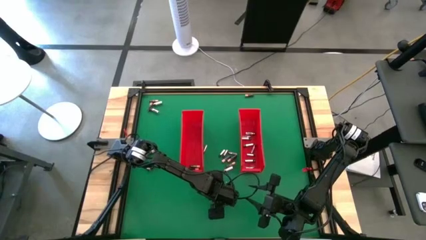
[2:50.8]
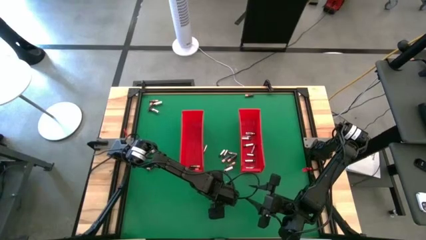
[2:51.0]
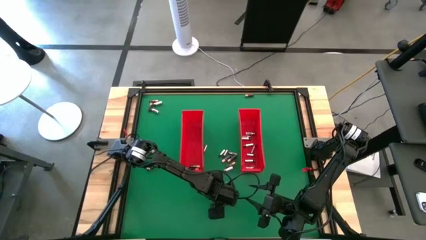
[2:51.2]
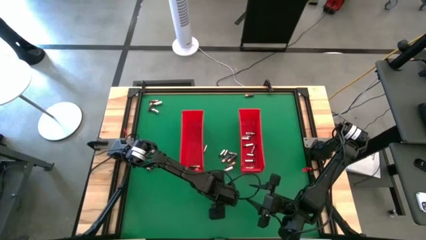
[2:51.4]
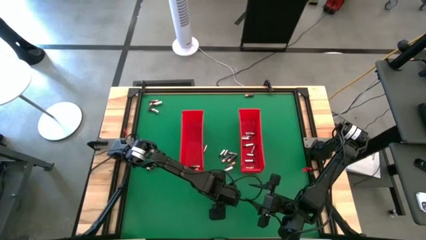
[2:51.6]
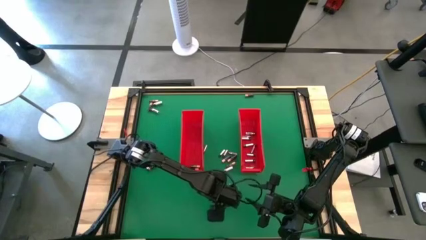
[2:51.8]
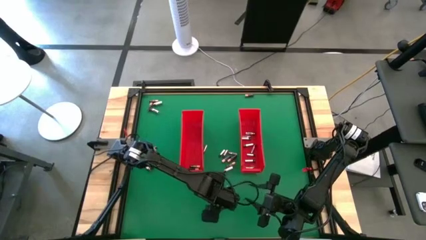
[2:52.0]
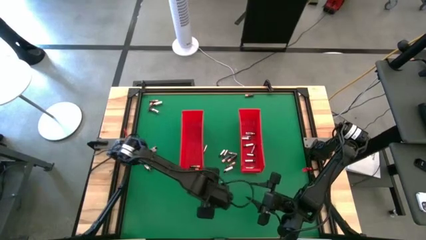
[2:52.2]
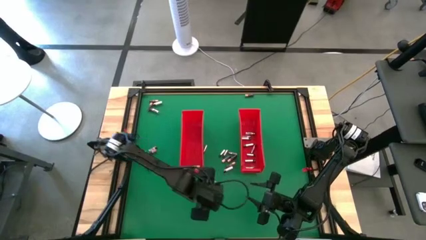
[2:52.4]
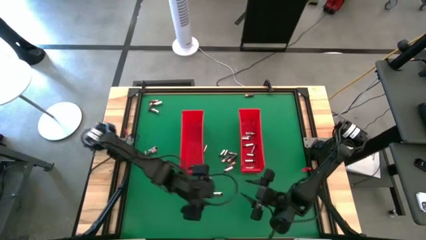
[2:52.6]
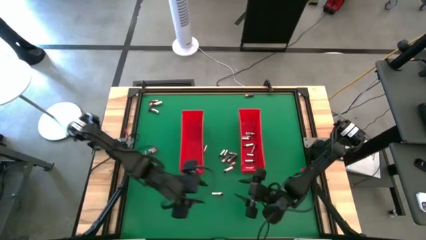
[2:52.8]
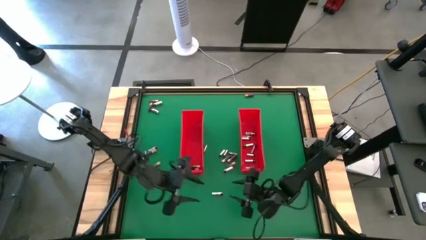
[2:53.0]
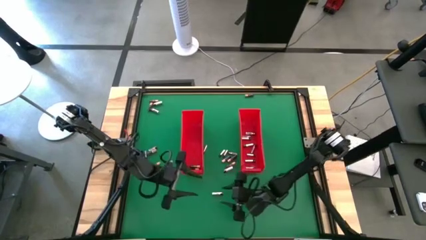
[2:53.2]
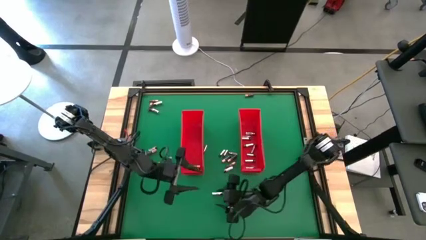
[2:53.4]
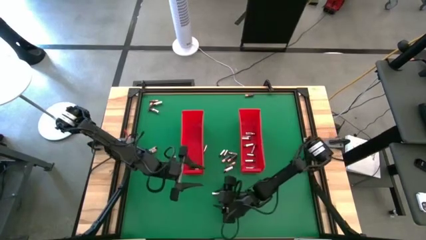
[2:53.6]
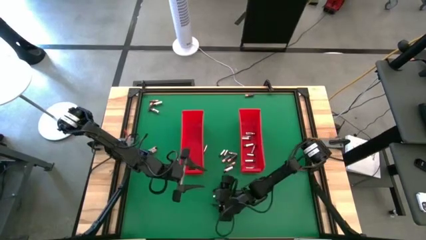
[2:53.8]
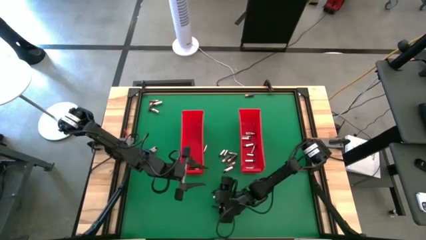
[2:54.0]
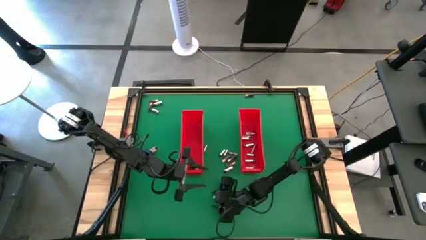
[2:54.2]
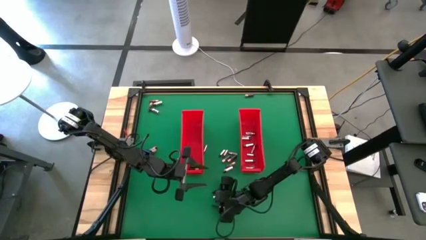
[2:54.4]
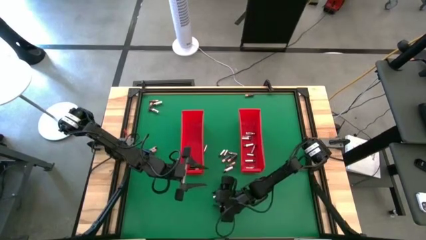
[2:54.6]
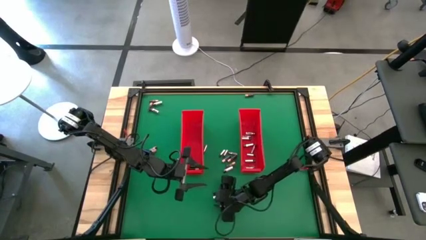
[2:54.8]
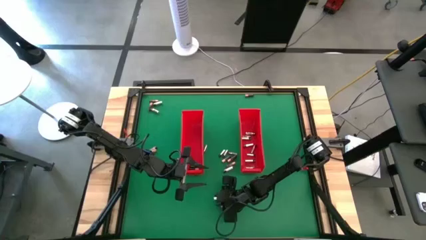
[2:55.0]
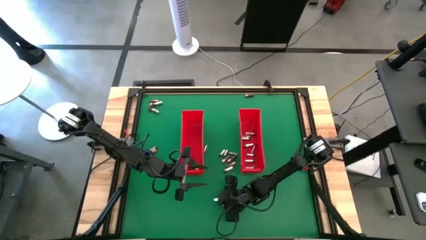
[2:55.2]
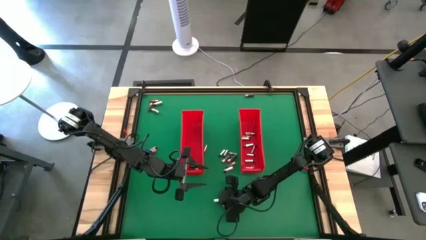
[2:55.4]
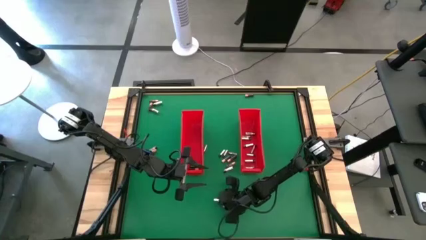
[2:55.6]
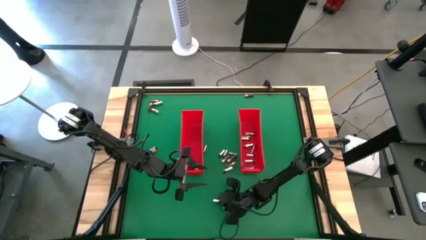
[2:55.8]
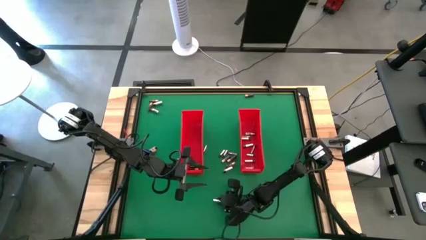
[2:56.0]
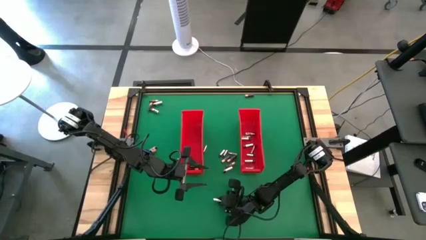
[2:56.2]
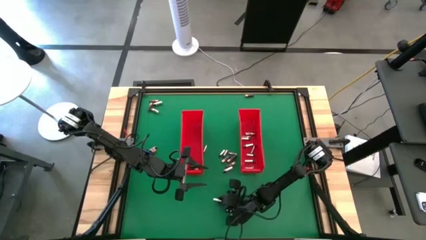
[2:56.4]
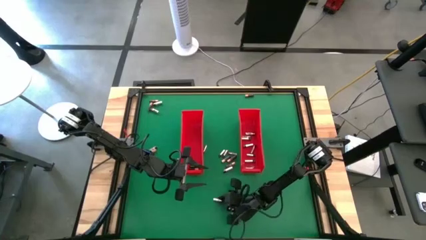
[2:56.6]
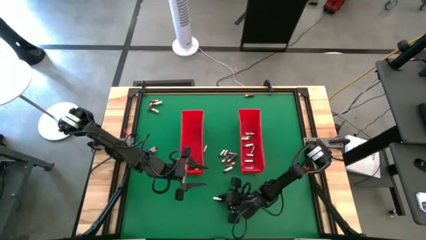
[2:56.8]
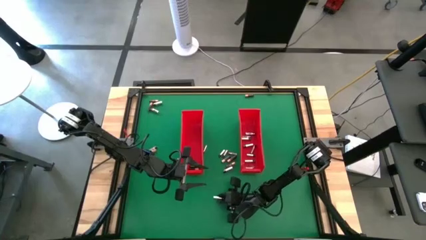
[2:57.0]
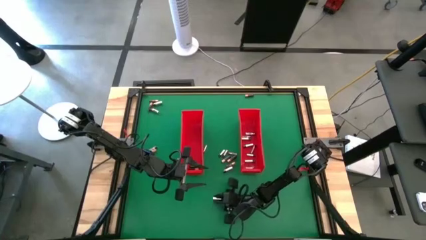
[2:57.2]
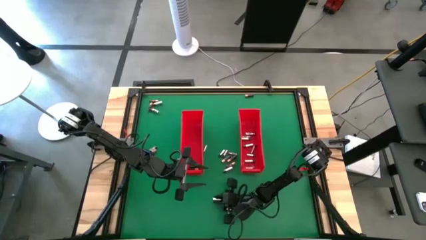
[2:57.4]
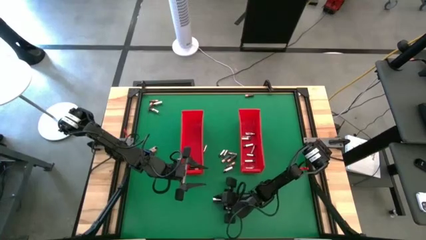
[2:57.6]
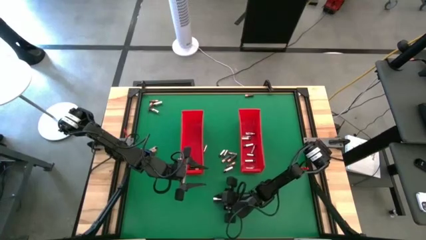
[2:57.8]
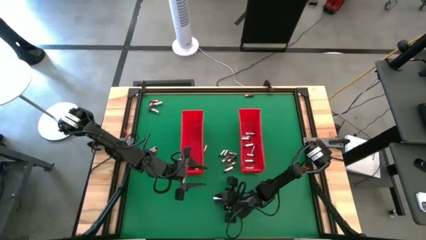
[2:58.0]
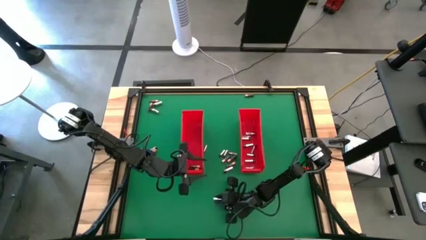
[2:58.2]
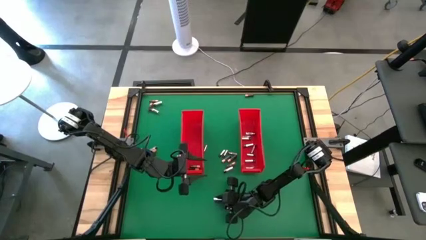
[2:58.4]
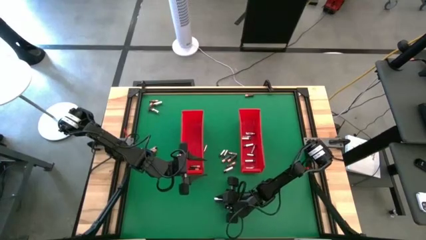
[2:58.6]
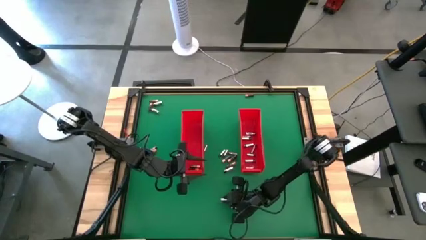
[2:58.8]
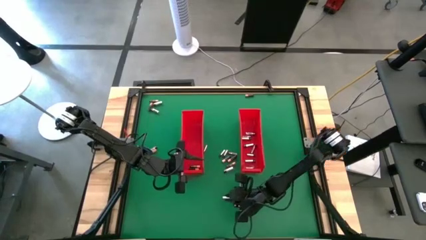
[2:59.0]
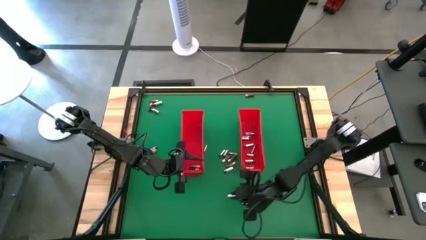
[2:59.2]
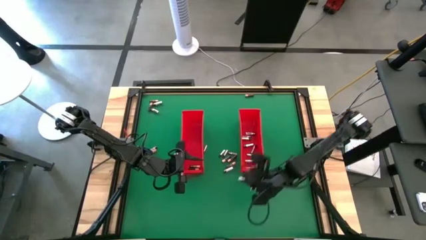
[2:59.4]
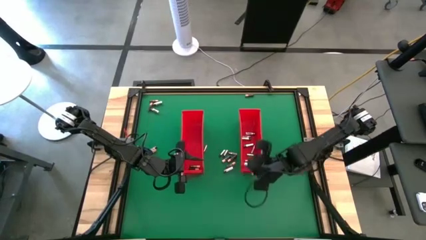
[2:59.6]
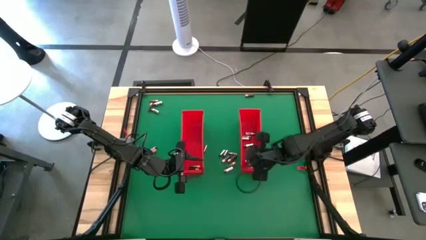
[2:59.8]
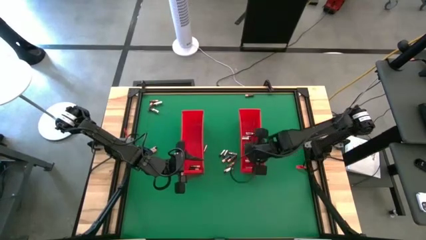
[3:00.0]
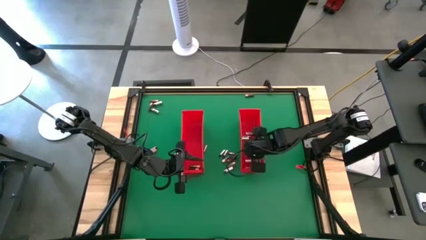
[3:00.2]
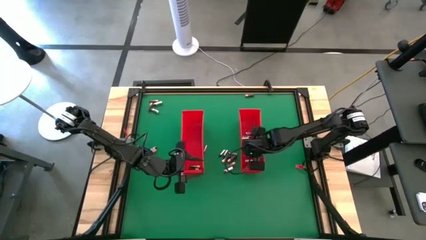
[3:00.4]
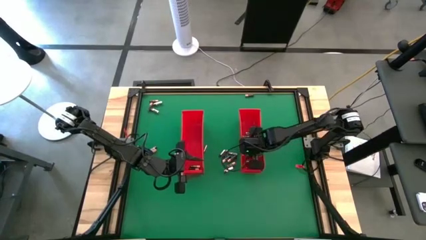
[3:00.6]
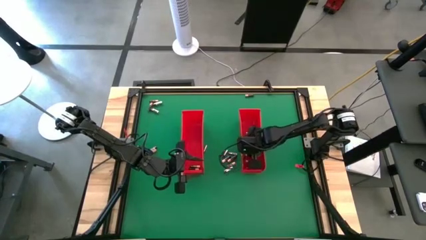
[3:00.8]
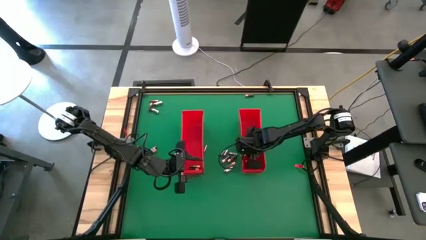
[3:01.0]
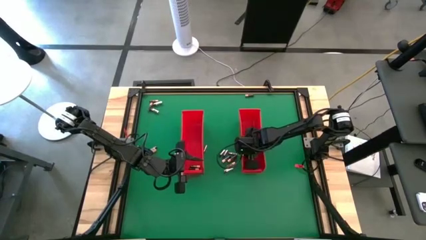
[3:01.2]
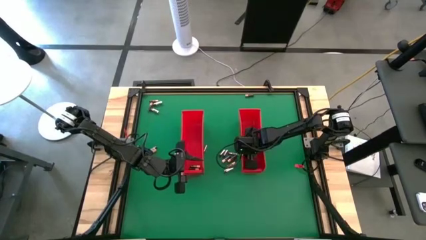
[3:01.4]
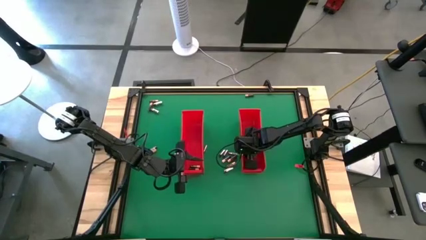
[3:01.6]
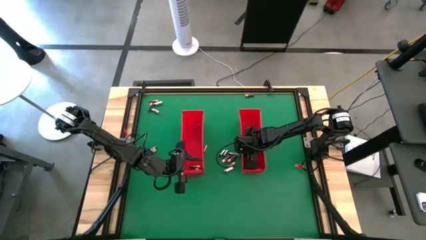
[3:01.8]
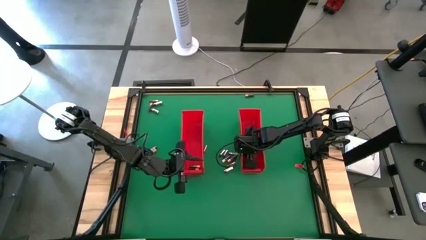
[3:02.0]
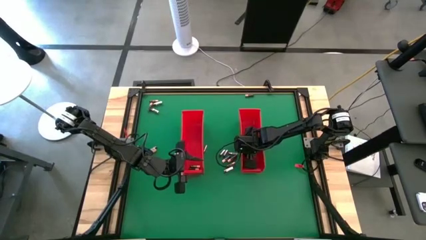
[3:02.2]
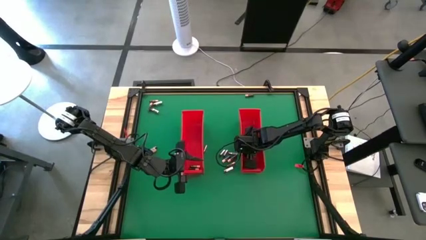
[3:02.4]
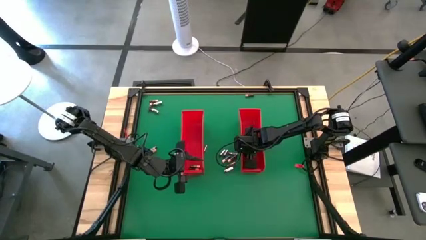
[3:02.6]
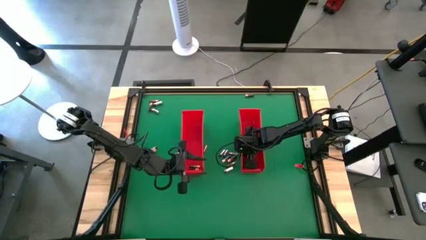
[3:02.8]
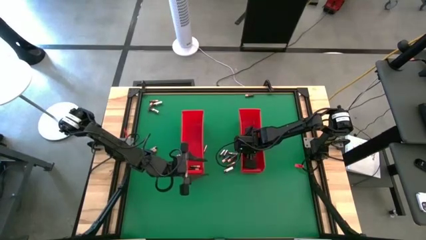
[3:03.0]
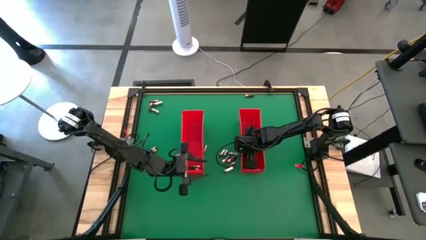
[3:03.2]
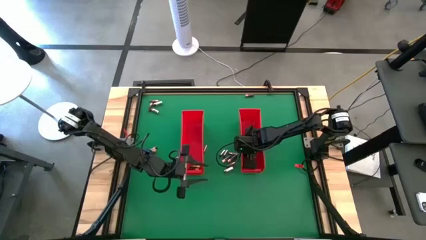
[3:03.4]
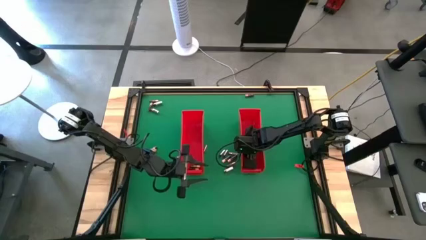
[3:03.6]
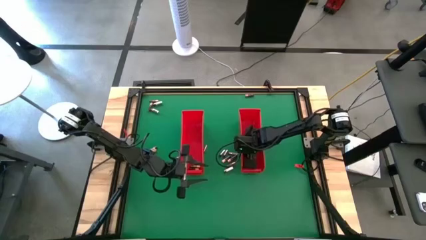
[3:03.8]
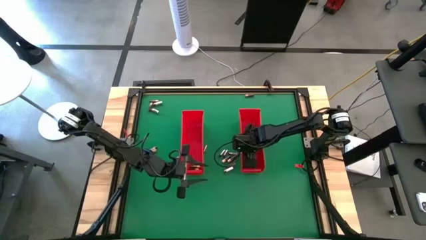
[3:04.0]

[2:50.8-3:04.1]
Task: Sort batteries
Put the silver battery into the right red bin
